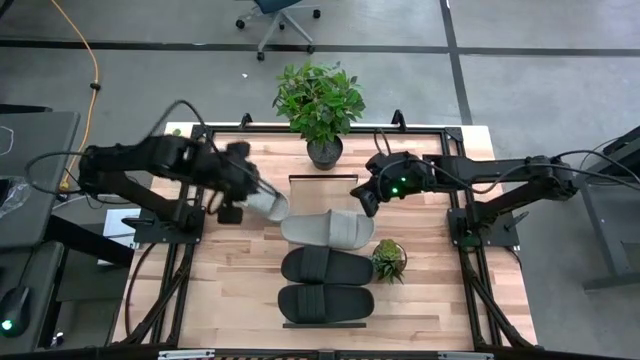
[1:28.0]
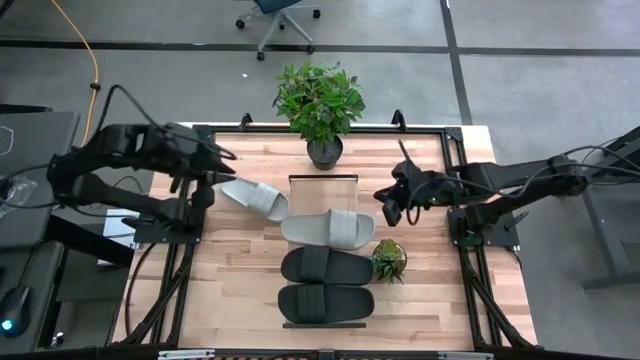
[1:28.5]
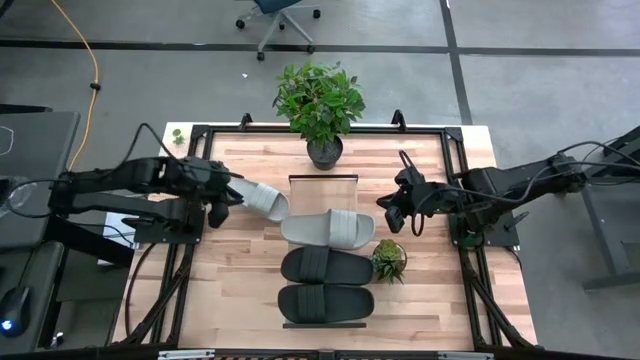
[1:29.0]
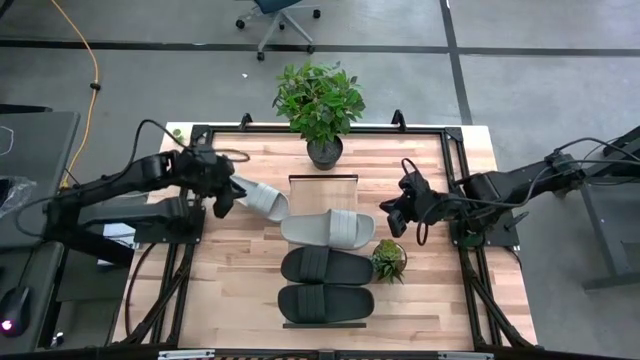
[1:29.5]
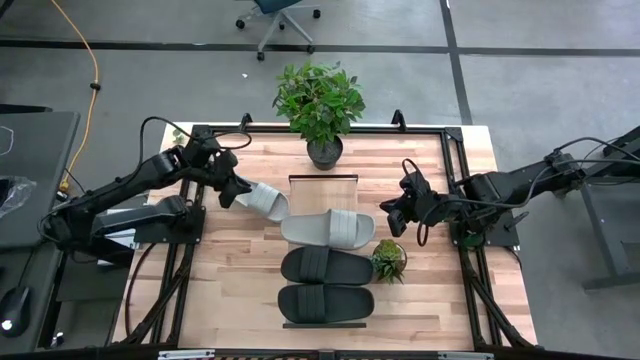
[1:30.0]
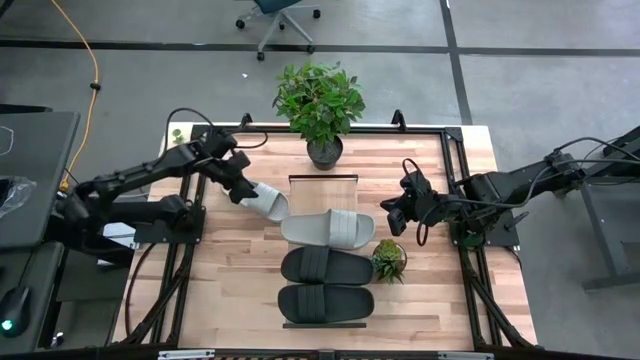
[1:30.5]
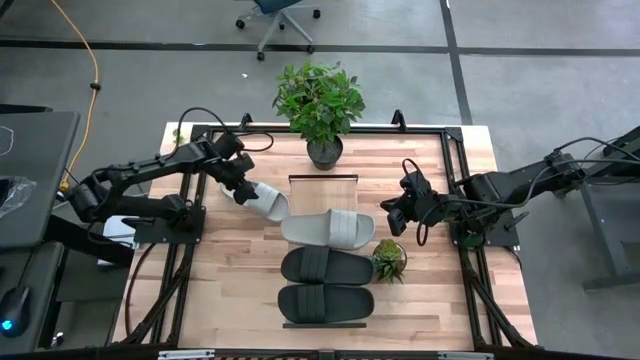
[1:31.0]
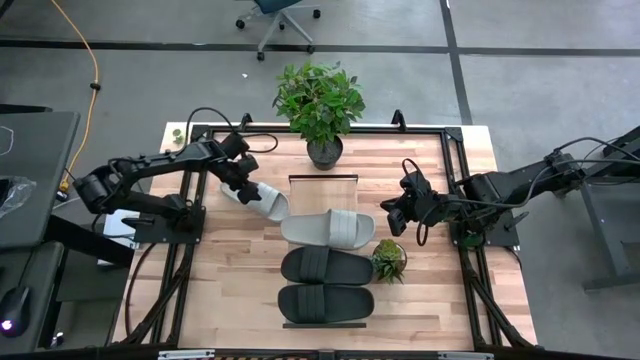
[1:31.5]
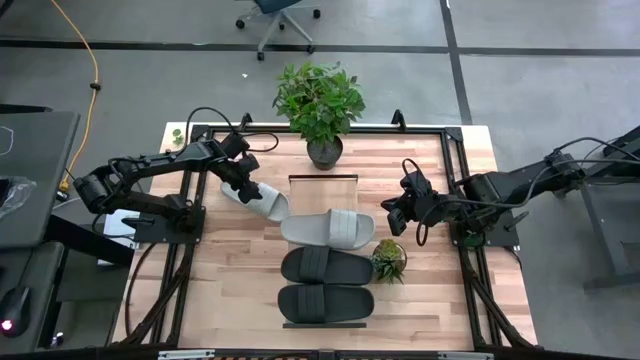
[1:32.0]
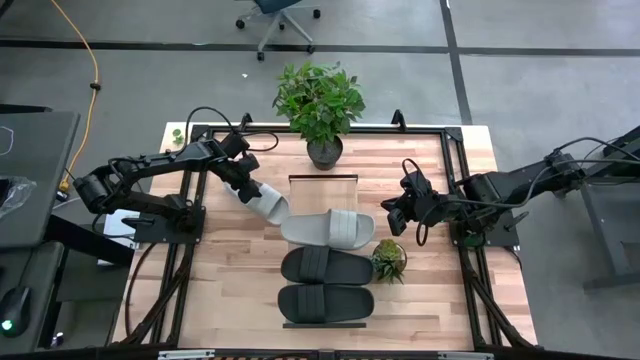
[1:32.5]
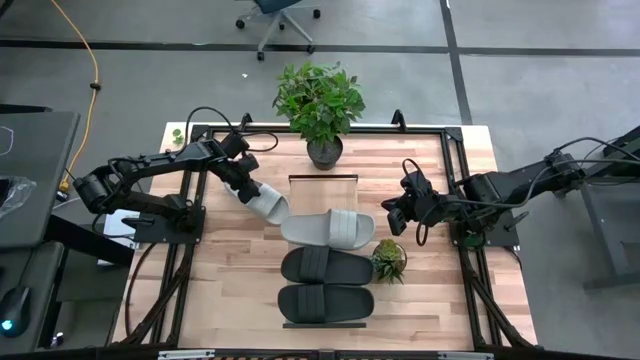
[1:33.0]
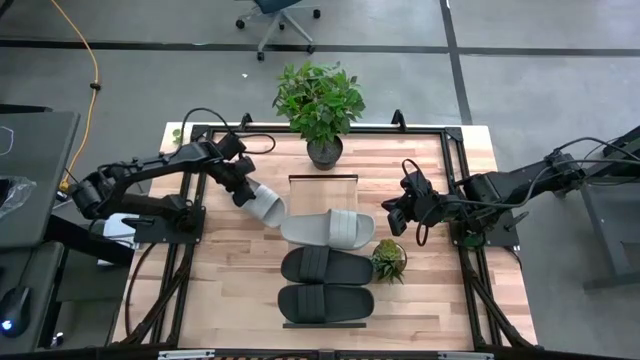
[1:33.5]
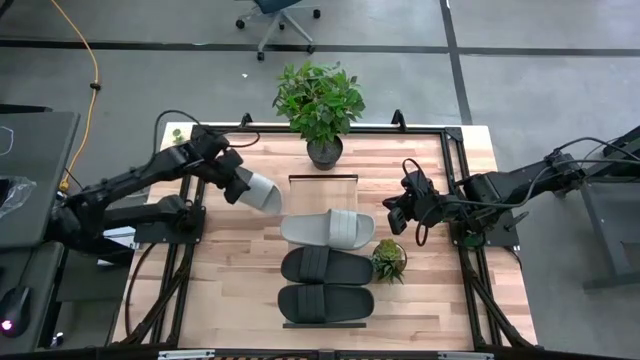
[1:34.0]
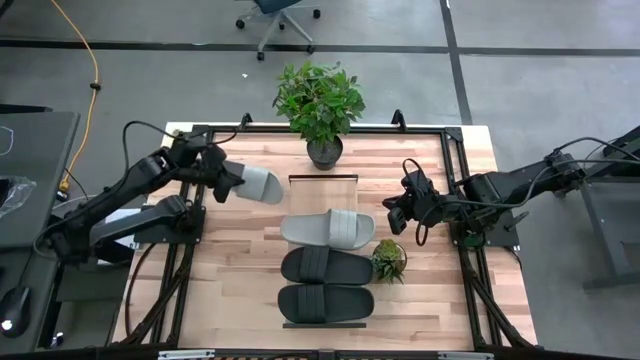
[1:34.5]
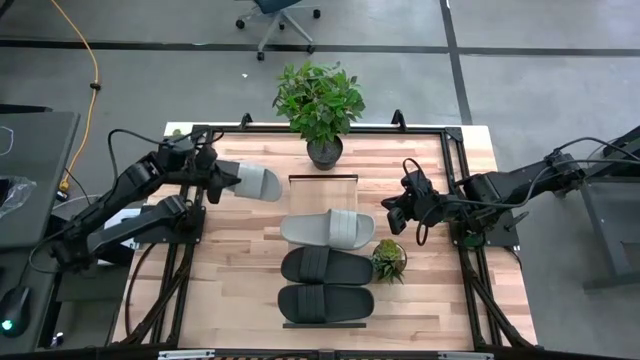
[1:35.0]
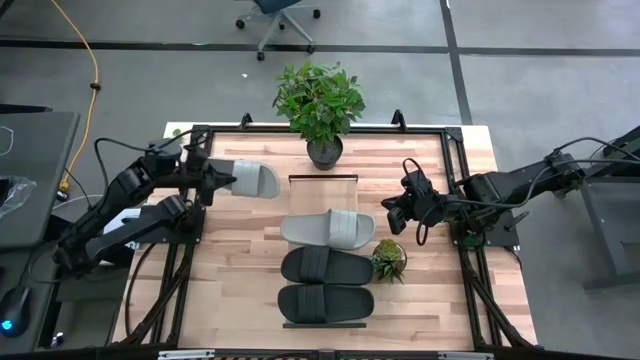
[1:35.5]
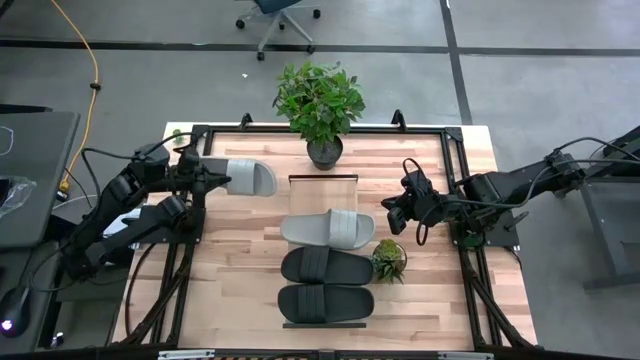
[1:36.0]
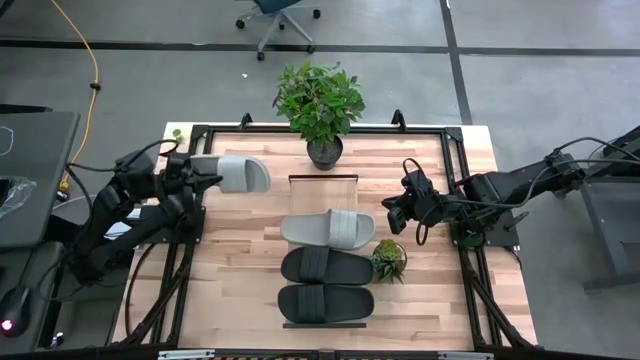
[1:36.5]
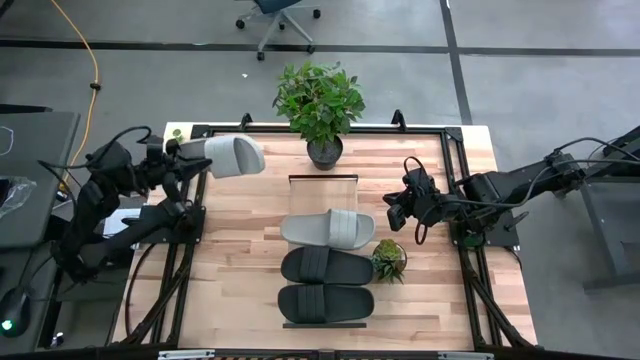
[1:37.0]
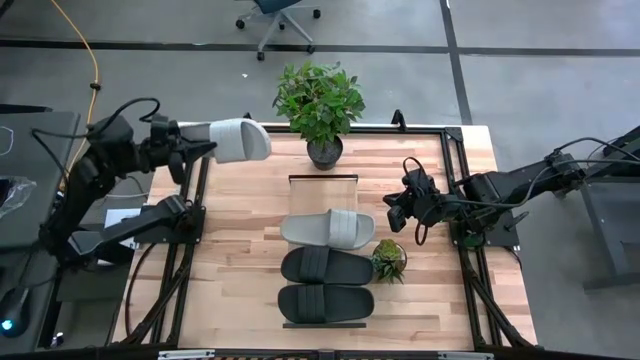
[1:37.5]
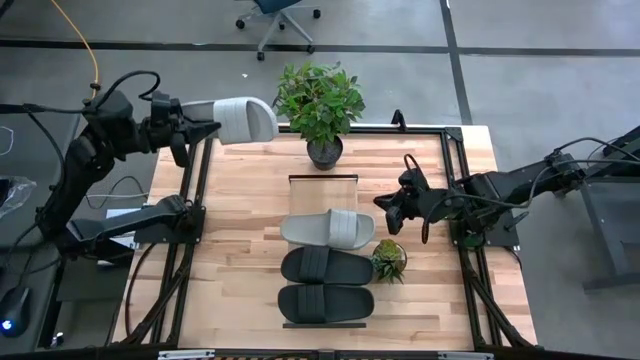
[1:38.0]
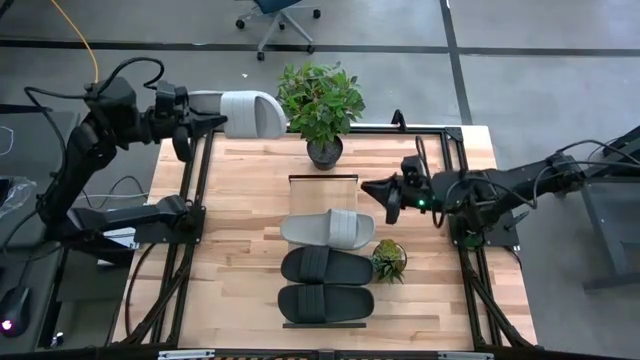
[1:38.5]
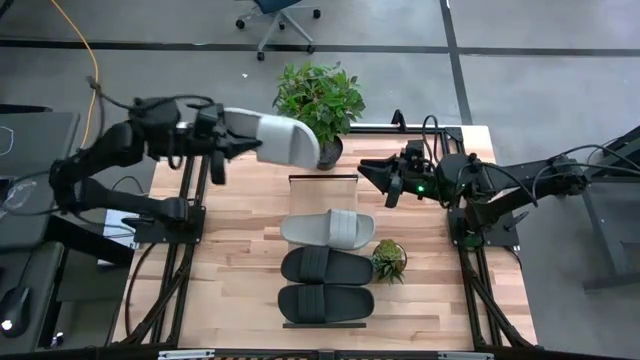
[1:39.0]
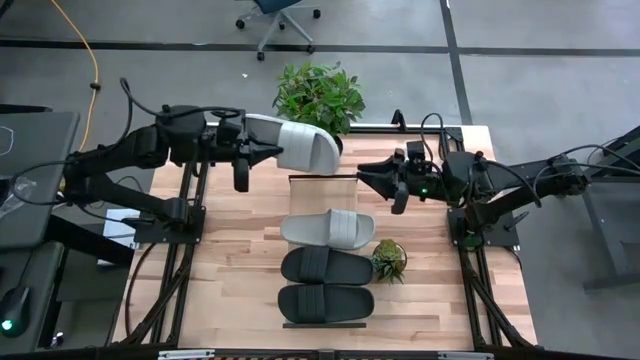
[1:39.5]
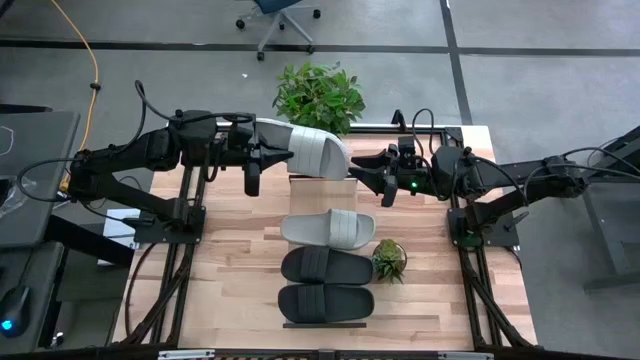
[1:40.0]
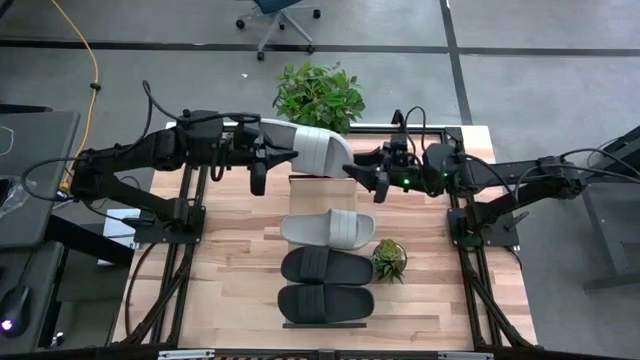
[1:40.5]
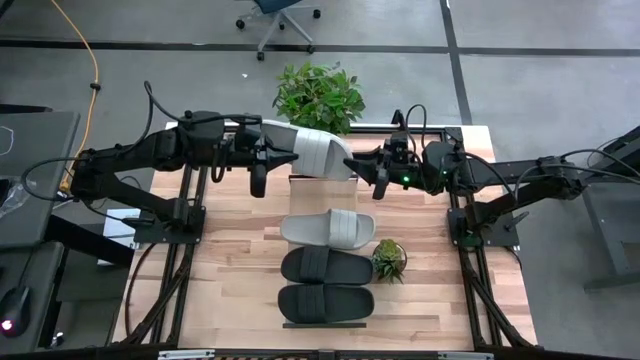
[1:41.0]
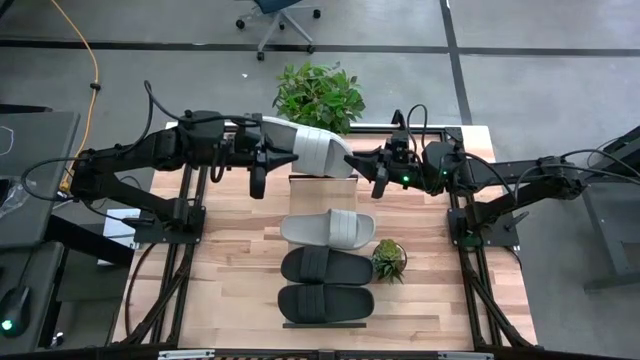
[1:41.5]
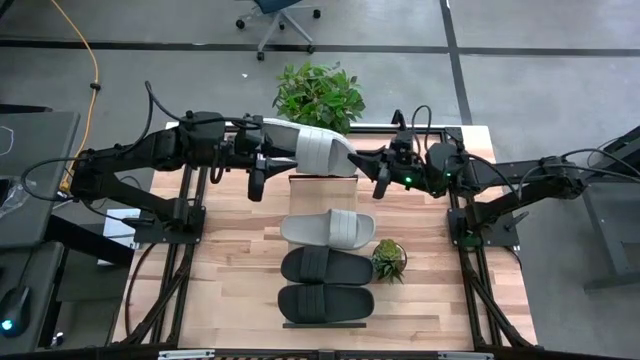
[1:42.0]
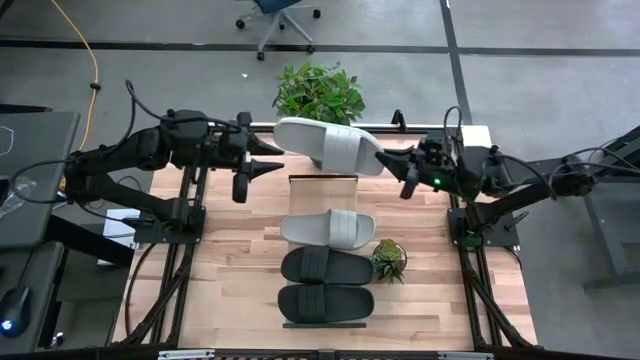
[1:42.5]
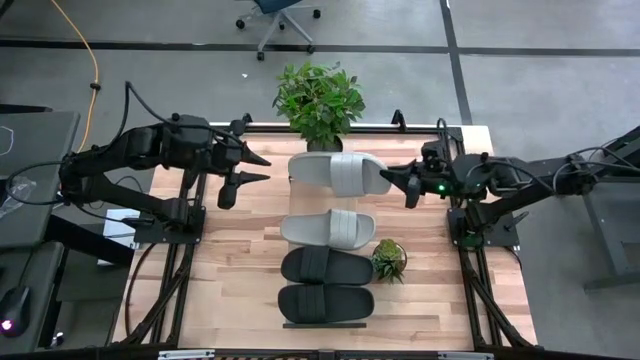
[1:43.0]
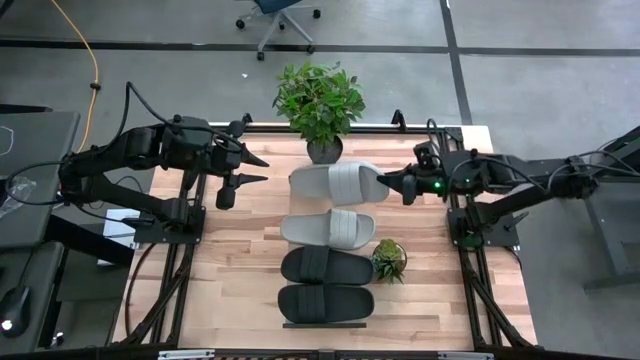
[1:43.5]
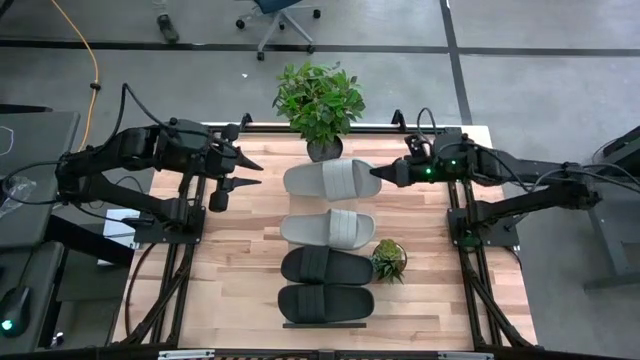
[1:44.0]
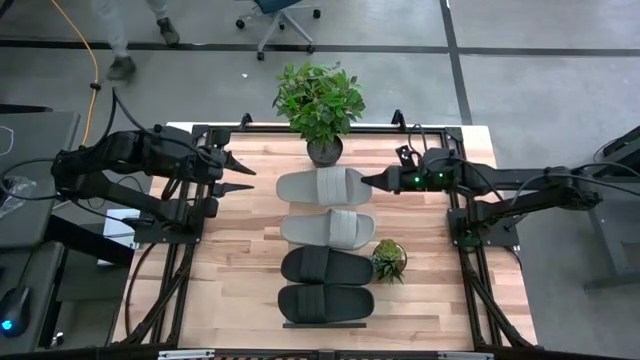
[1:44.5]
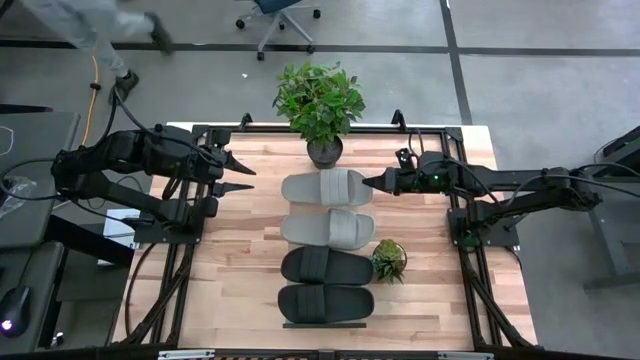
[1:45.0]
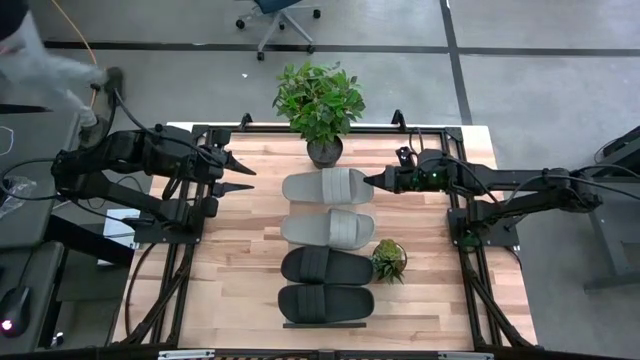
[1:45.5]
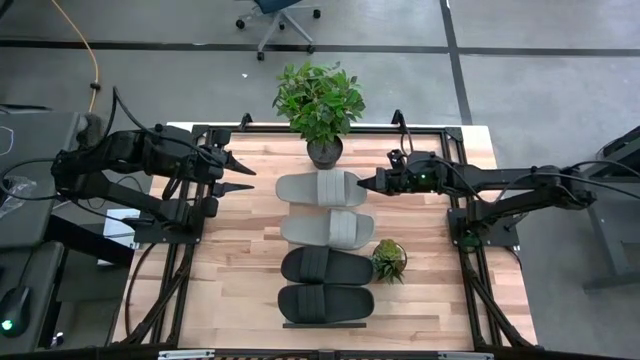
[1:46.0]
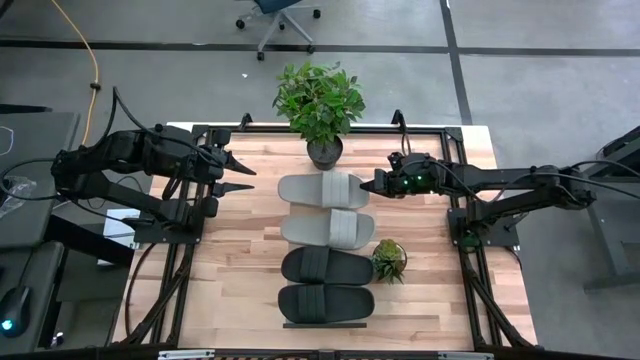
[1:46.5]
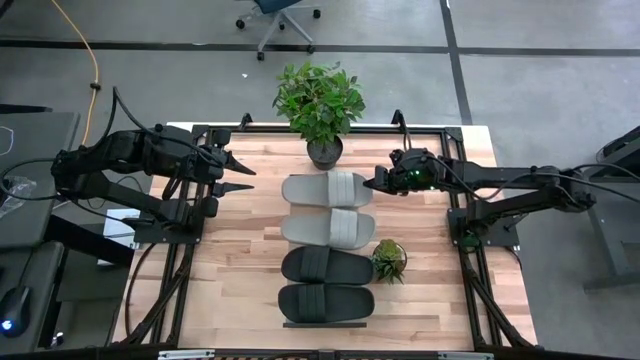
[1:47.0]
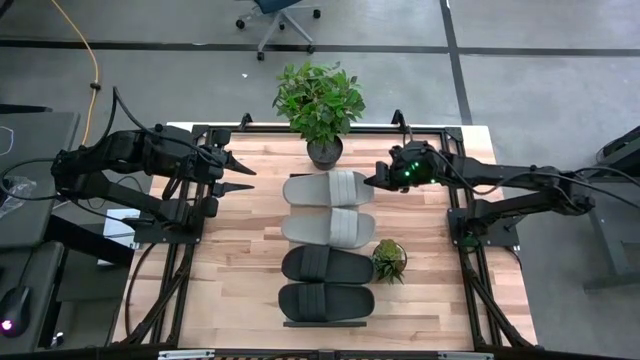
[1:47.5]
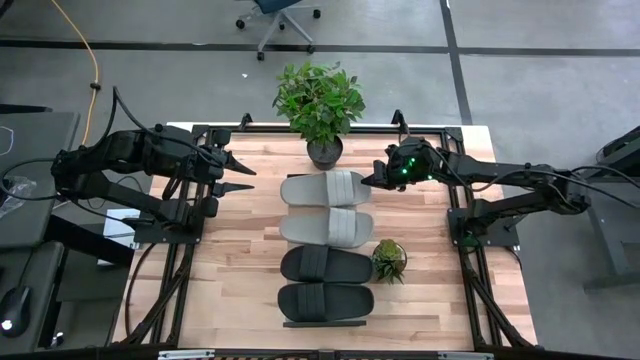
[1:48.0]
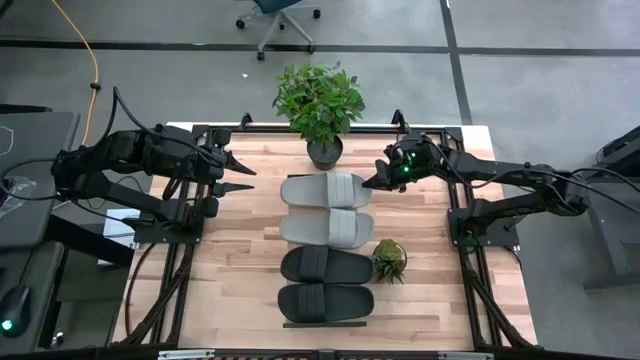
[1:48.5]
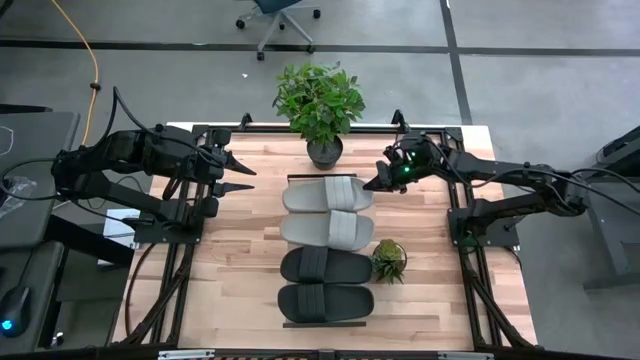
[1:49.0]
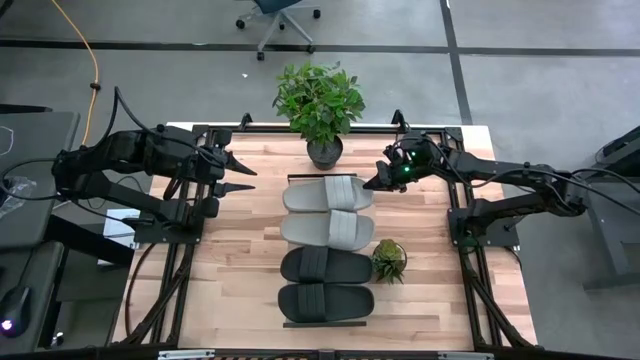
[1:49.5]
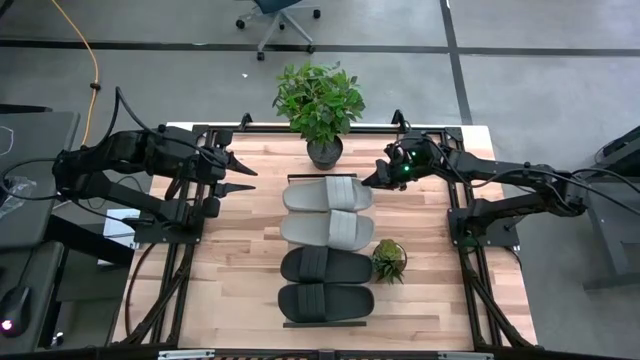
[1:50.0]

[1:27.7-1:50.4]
Task: Pick and place slides into the shelf
Put the gray slide into the shelf

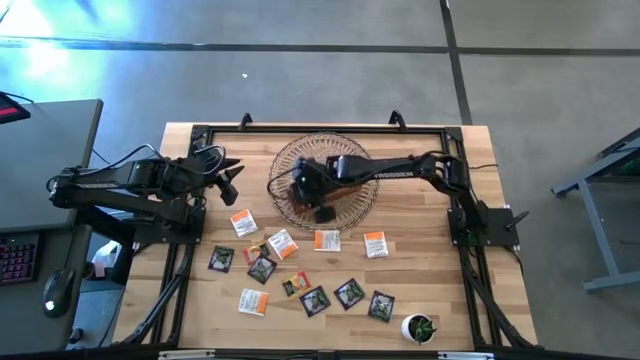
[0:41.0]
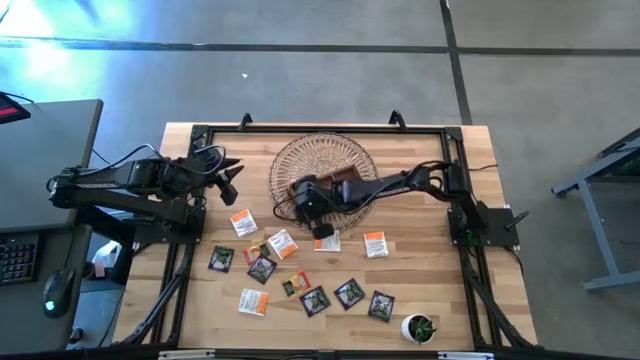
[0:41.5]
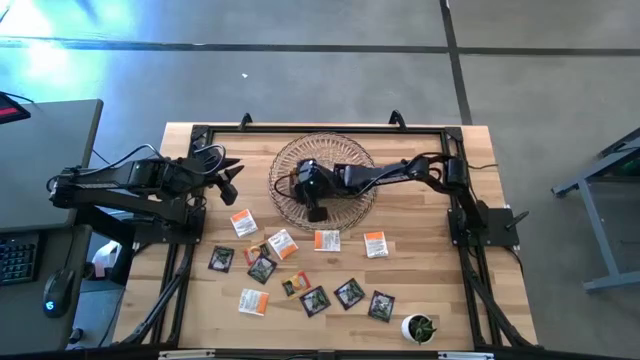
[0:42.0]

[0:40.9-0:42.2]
Task: Pick & Place Tea
Adjust the brown wooden organizer
